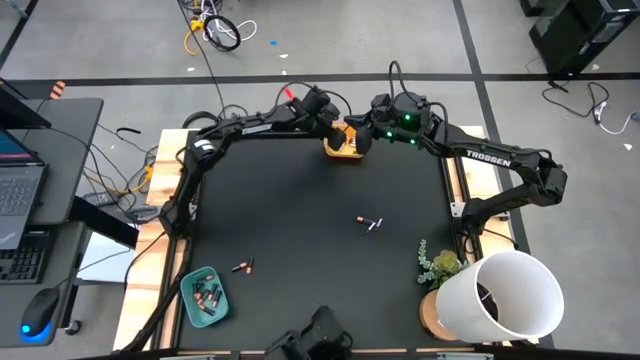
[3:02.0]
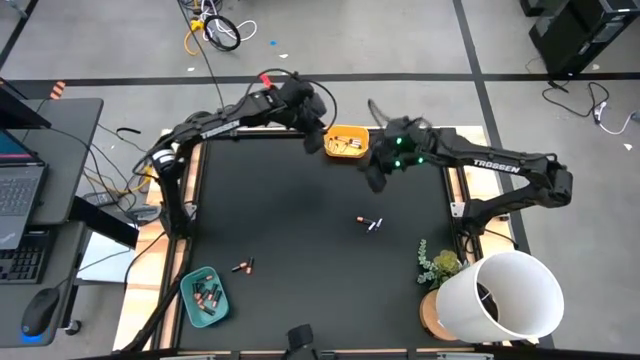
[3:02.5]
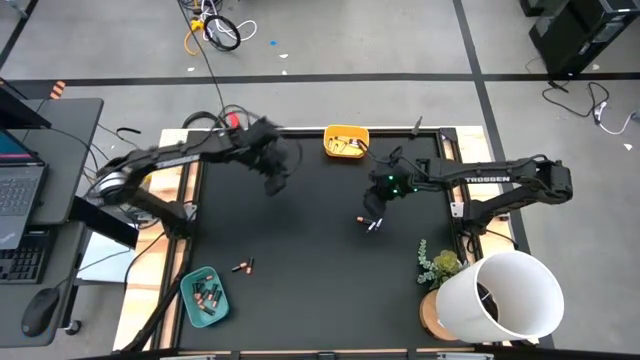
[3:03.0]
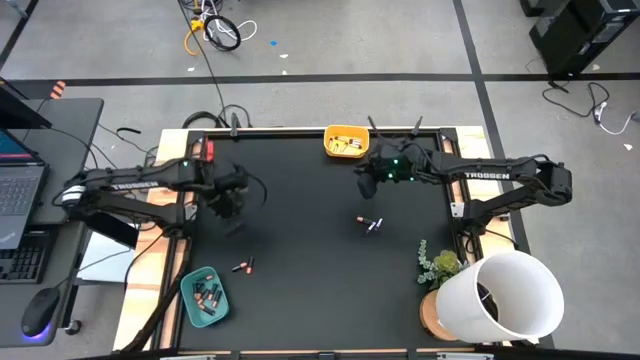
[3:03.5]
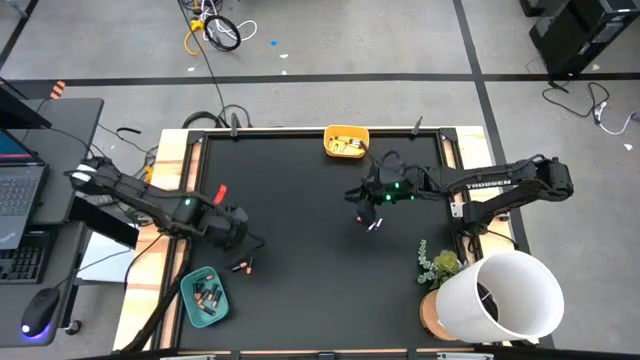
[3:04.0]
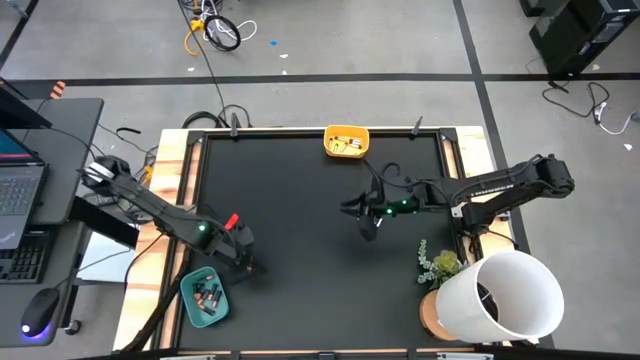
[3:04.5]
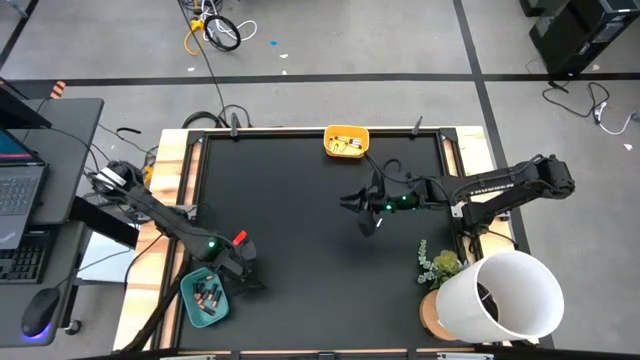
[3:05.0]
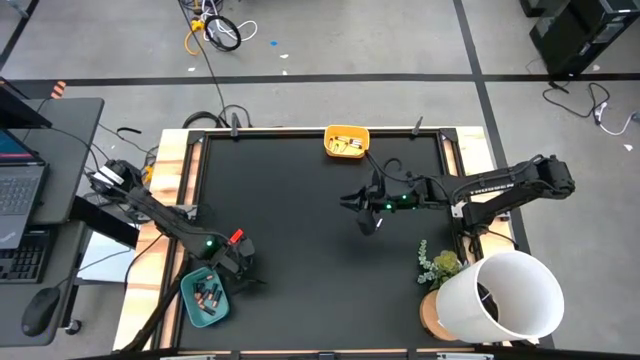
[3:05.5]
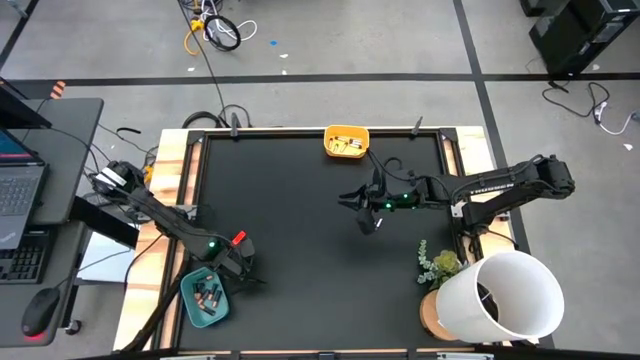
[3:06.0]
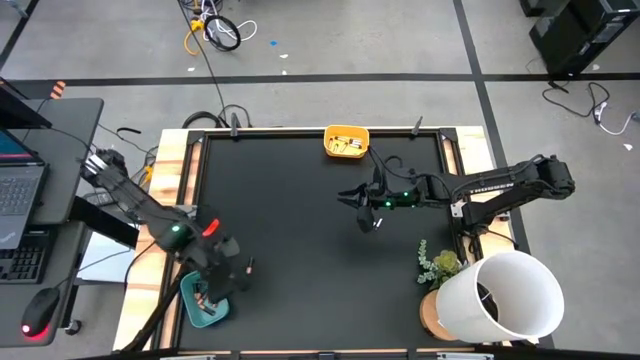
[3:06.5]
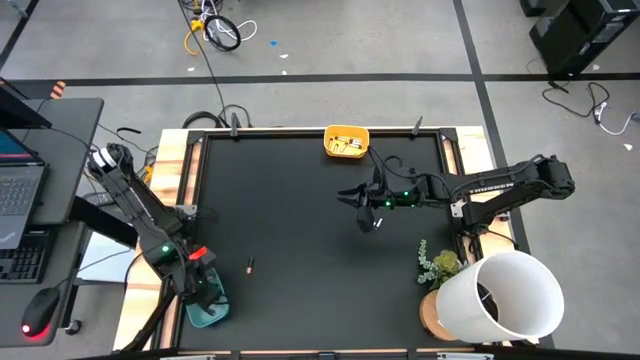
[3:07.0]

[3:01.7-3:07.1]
Task: Sort batteries
Put the black battery into the green bin

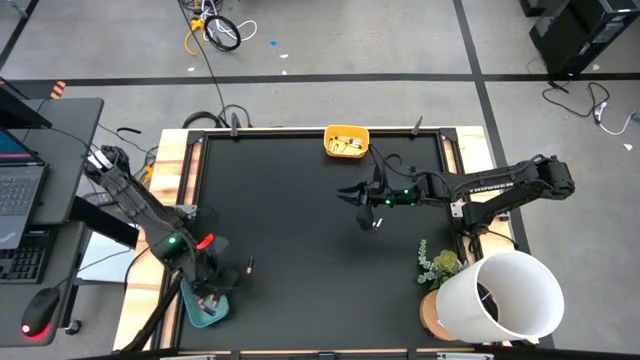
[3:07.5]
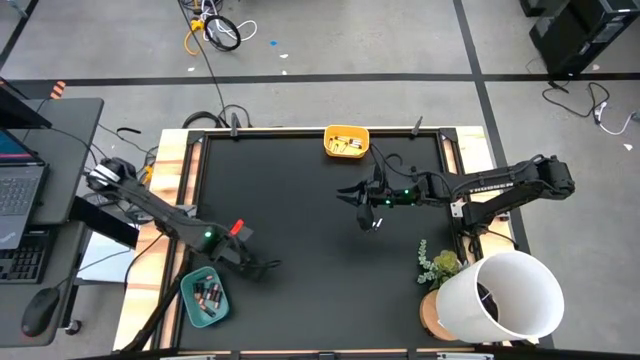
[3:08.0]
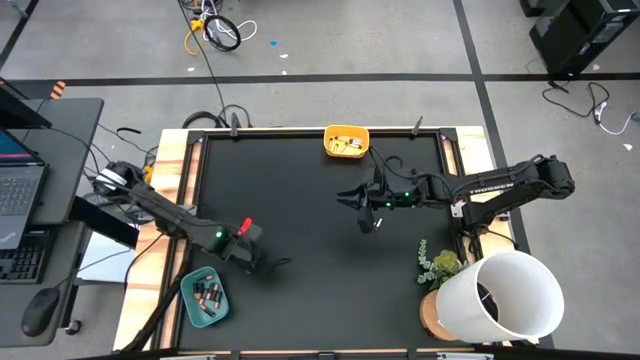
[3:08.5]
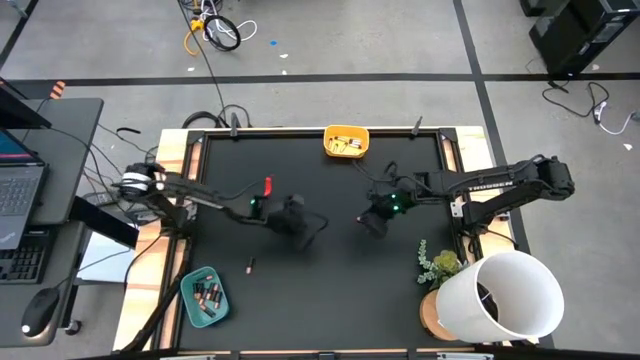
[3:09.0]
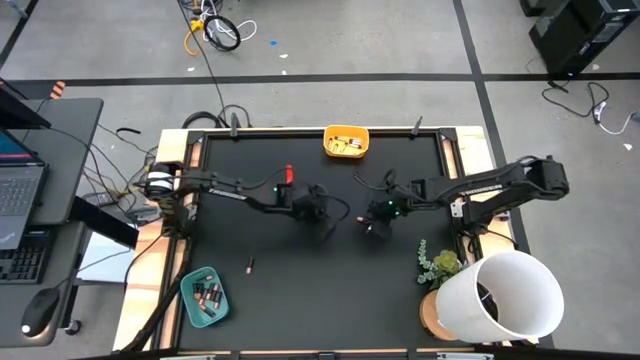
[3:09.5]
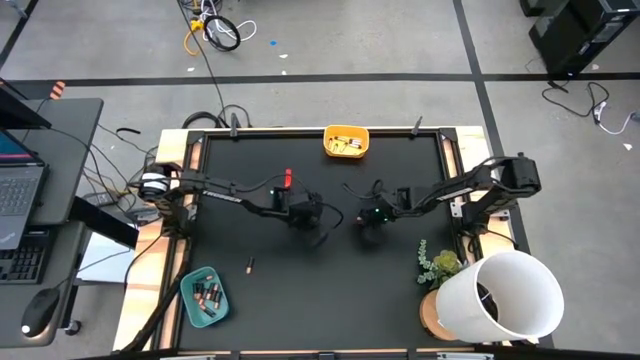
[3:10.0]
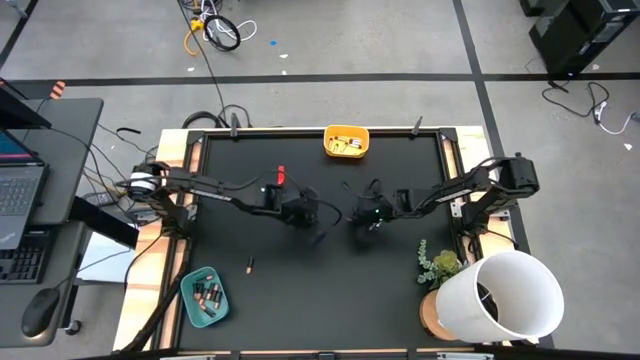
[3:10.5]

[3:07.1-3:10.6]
Put the black battery into the green bin

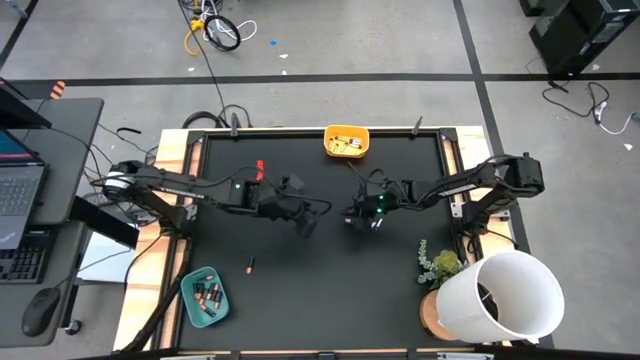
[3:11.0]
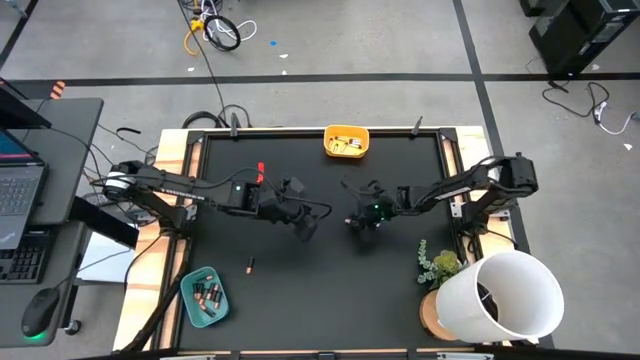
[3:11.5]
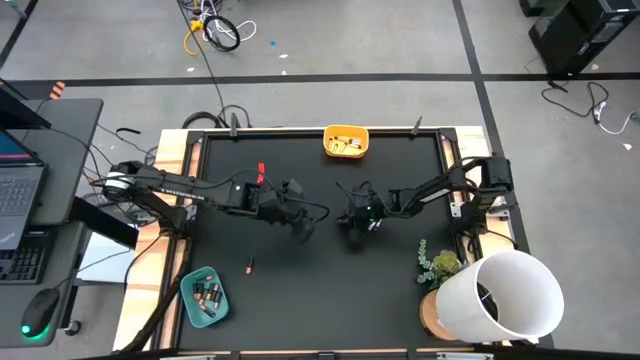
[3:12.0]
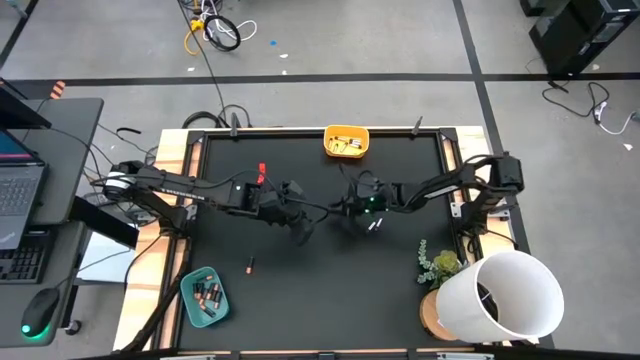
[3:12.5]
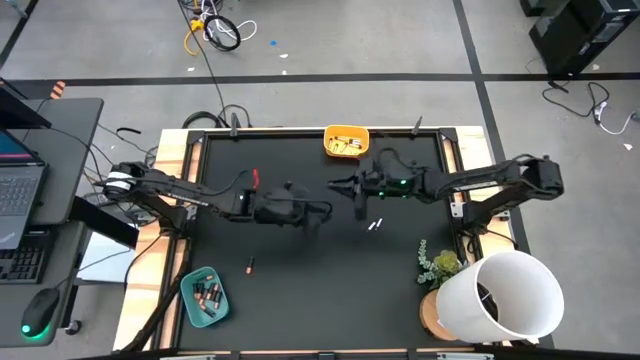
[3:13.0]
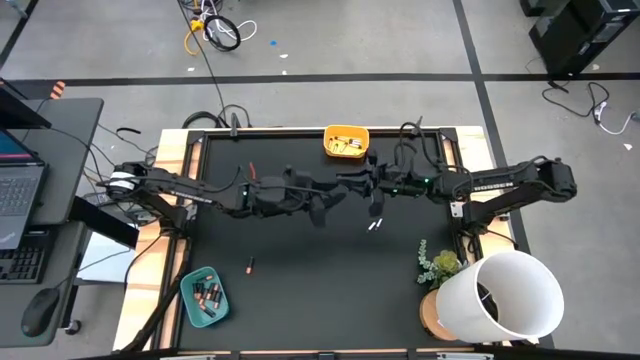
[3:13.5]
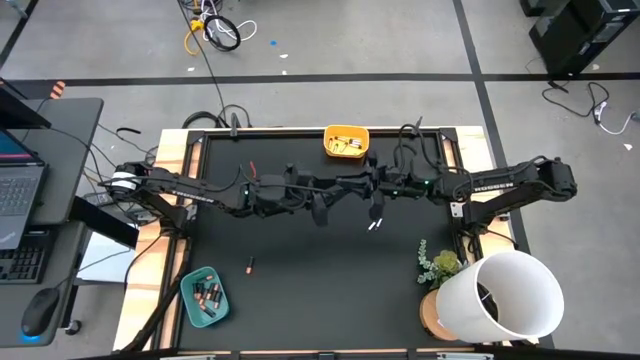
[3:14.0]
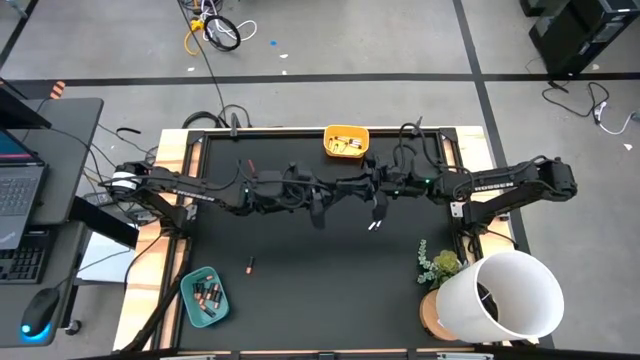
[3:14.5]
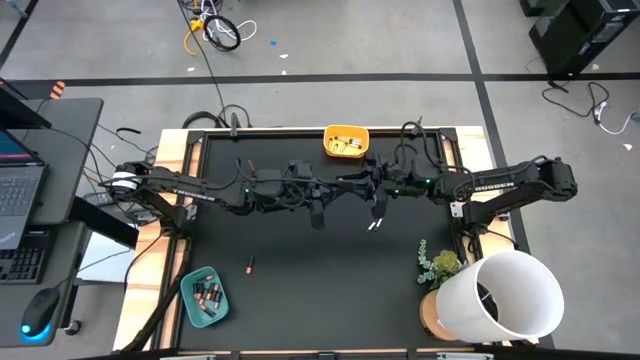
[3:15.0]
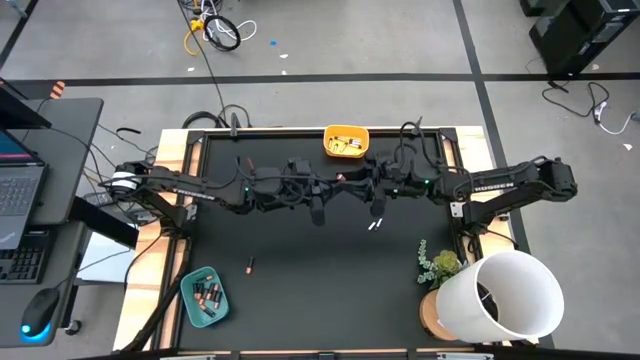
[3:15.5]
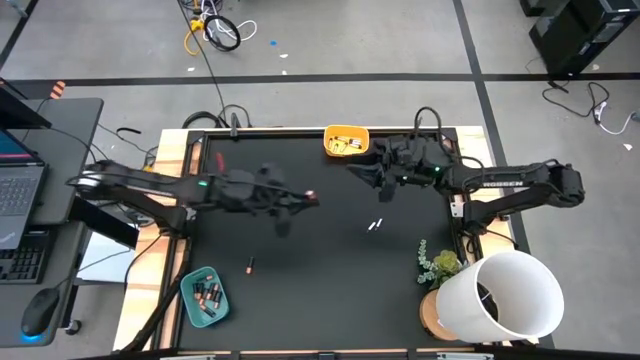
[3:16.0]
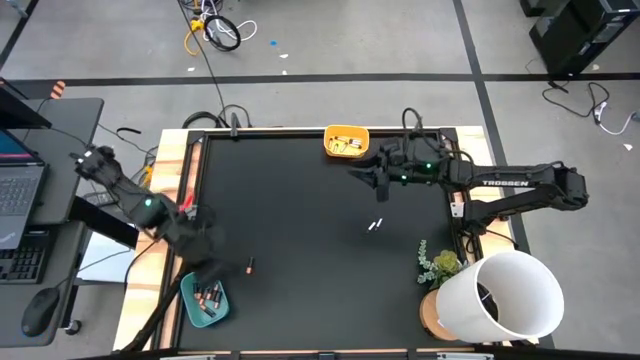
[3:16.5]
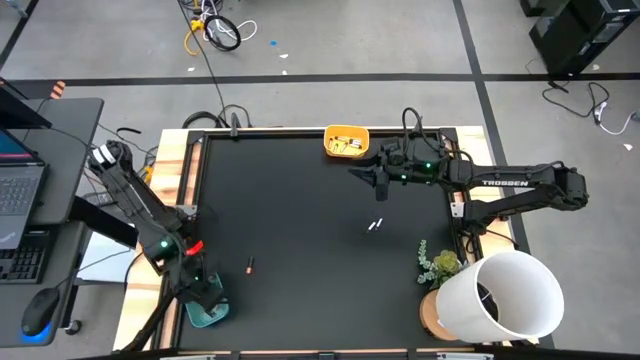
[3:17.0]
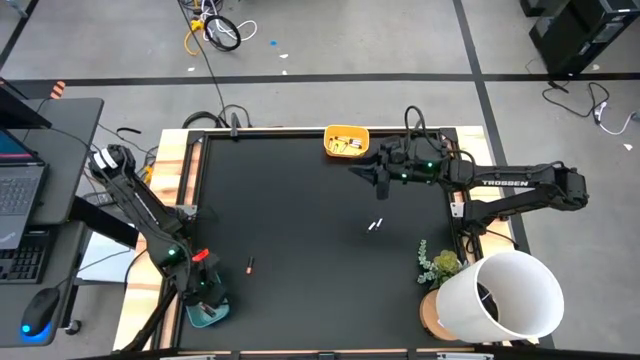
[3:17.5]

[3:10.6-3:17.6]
Put the black battery into the green bin

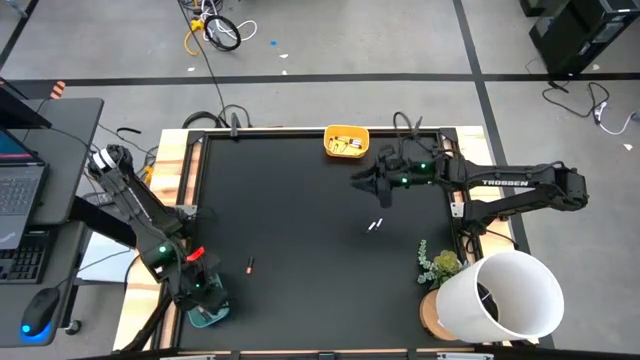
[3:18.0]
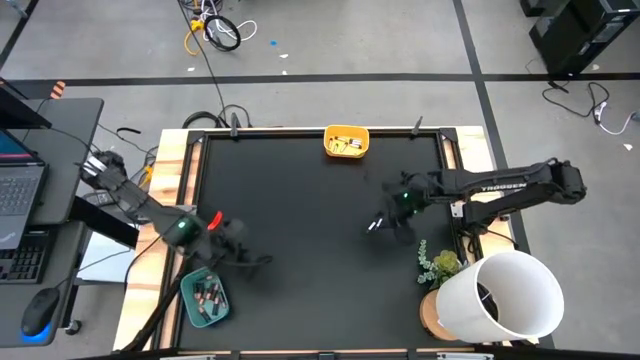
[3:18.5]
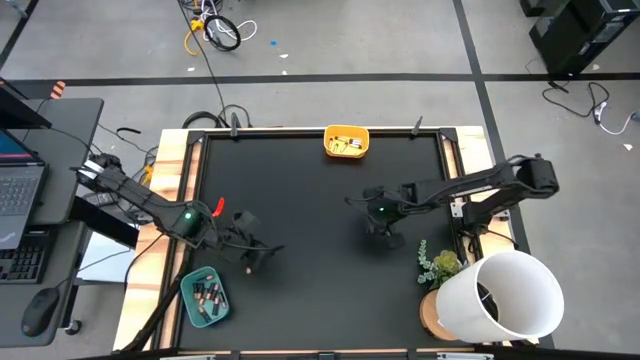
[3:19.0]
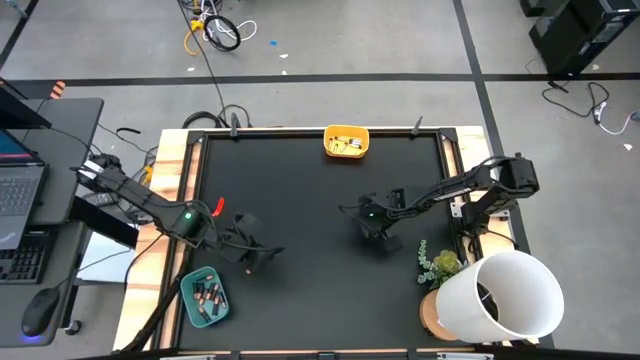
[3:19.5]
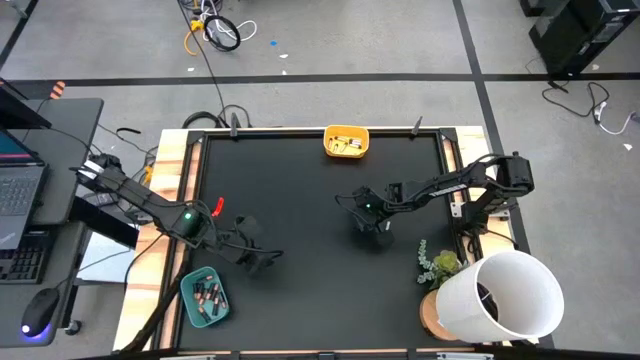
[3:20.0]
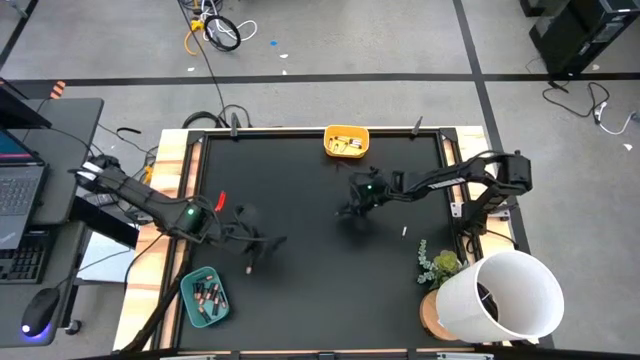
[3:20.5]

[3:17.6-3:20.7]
Put the silver battery into the yellow bin

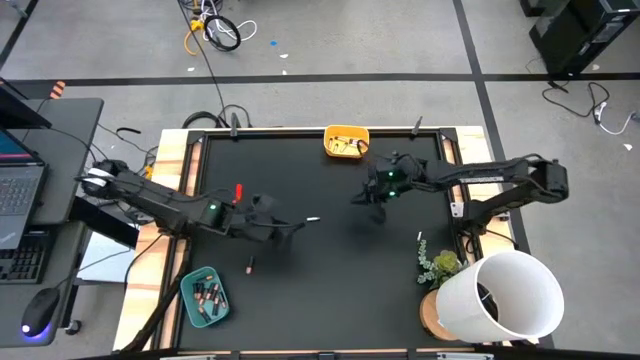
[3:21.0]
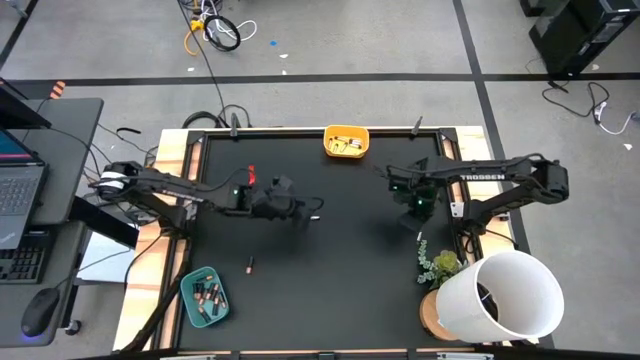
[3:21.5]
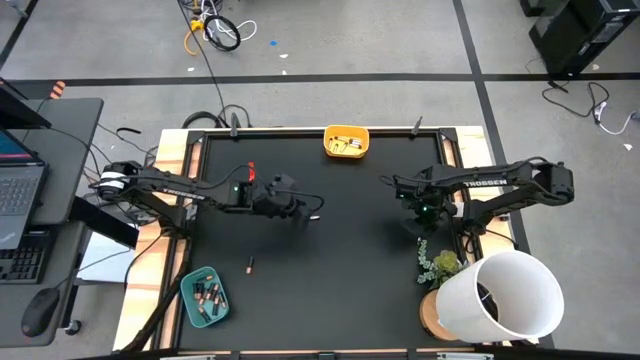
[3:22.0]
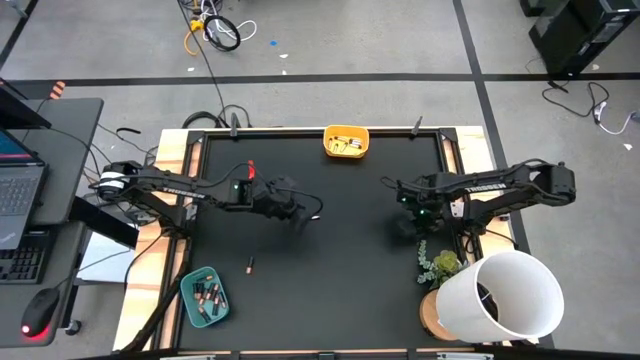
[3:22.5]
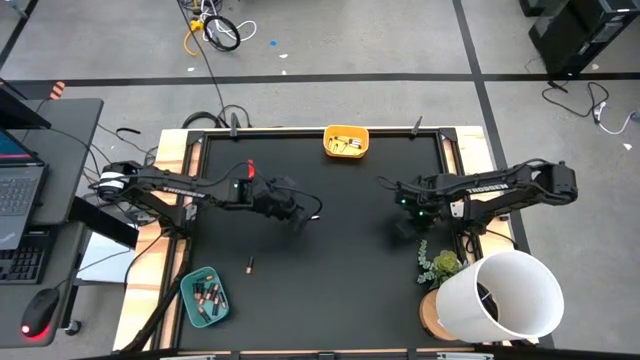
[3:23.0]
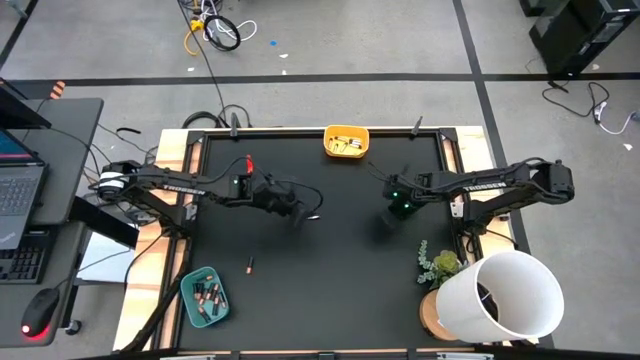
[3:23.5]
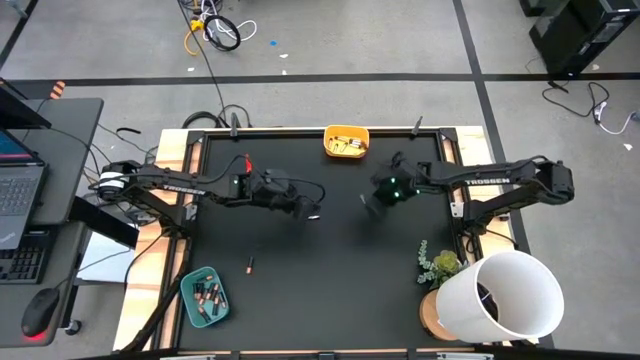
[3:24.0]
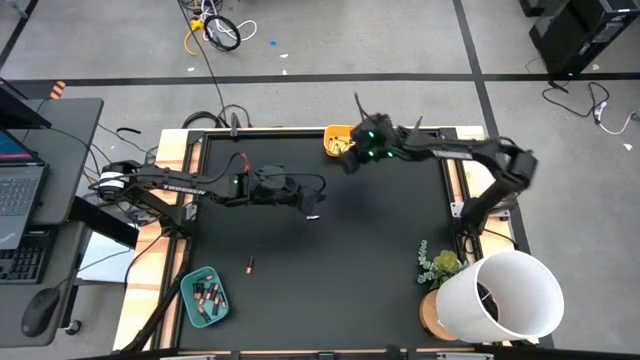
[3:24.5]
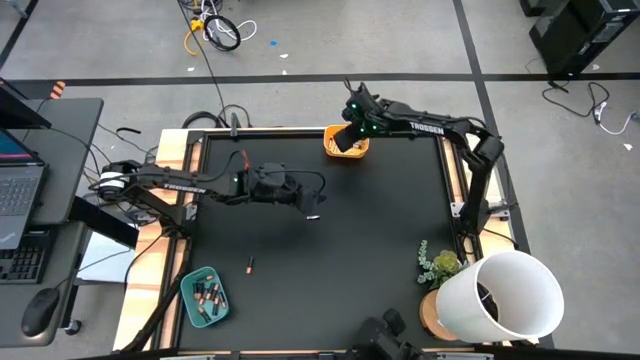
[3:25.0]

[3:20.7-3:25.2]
Put the silver battery into the yellow bin
